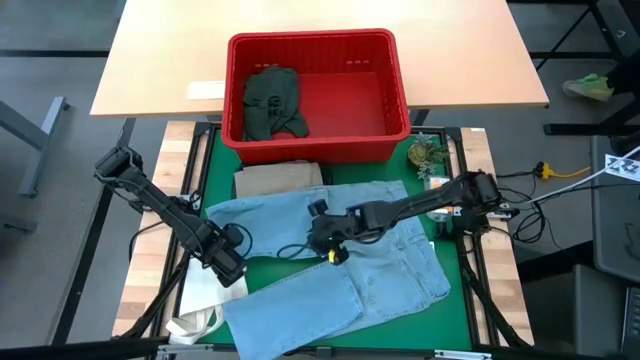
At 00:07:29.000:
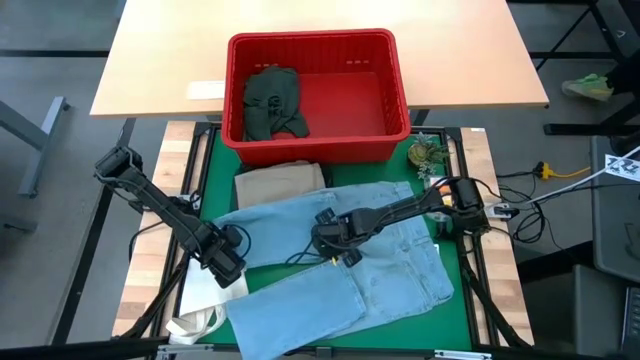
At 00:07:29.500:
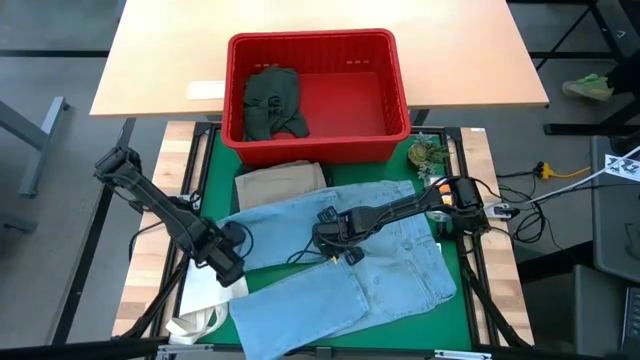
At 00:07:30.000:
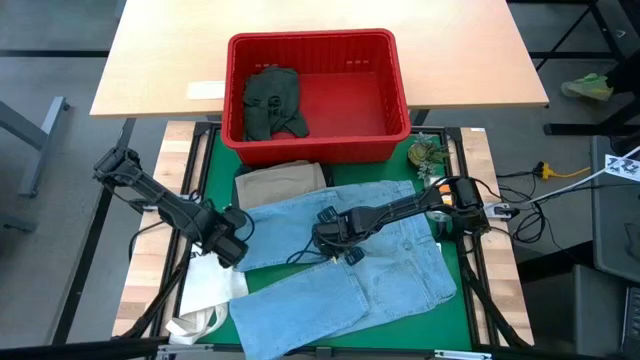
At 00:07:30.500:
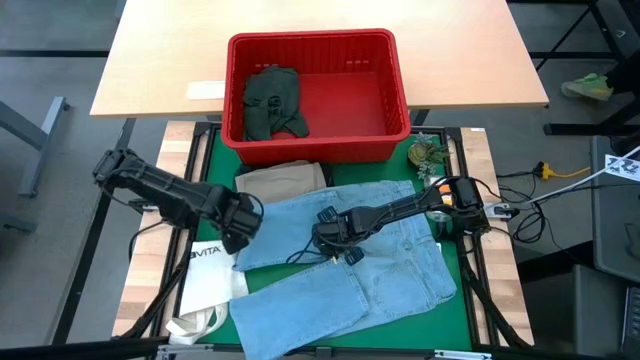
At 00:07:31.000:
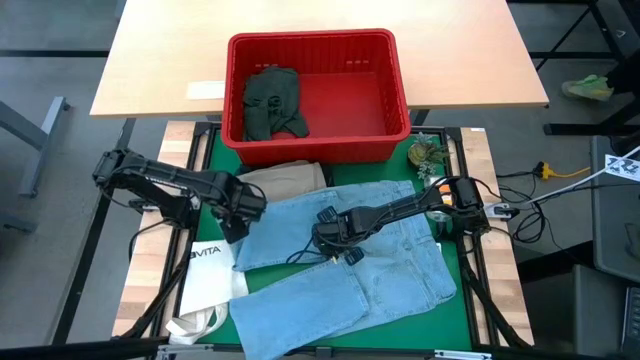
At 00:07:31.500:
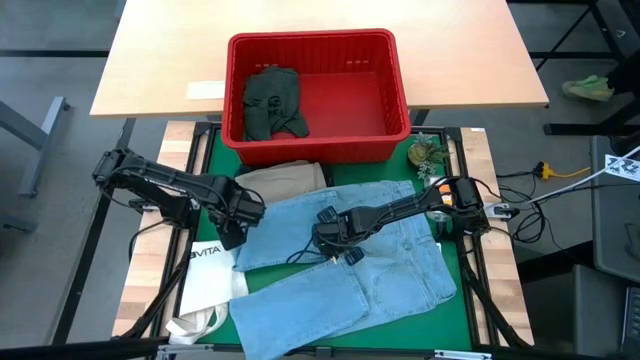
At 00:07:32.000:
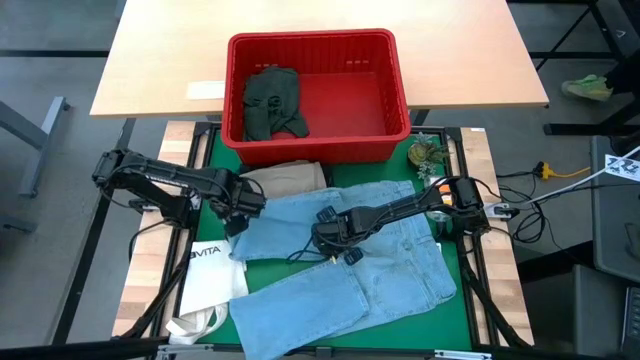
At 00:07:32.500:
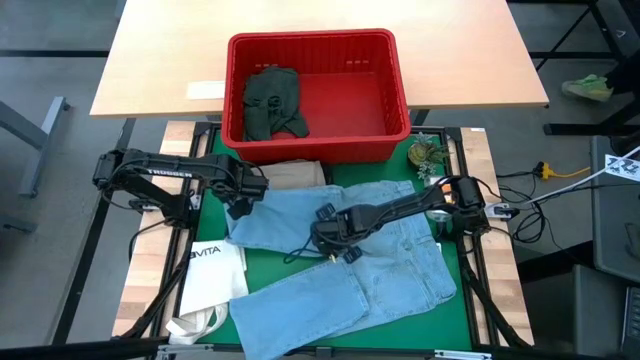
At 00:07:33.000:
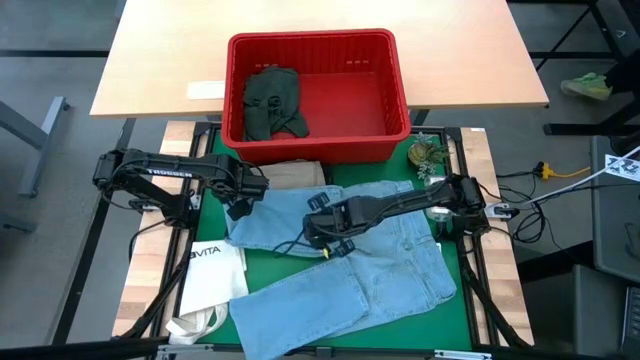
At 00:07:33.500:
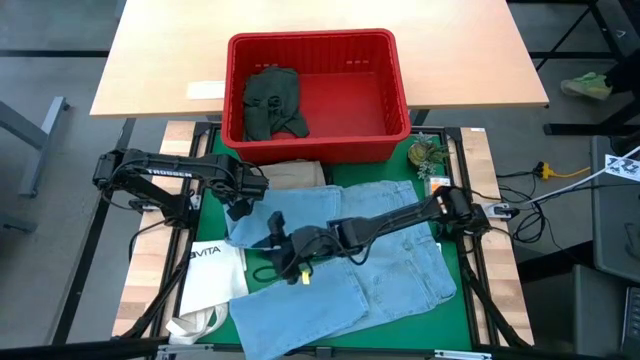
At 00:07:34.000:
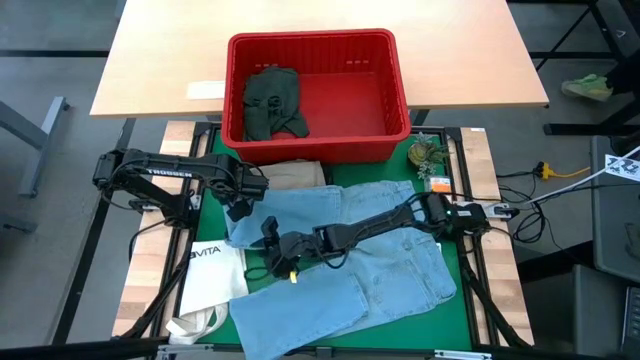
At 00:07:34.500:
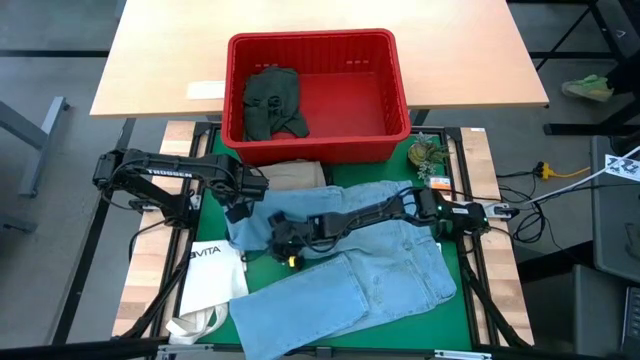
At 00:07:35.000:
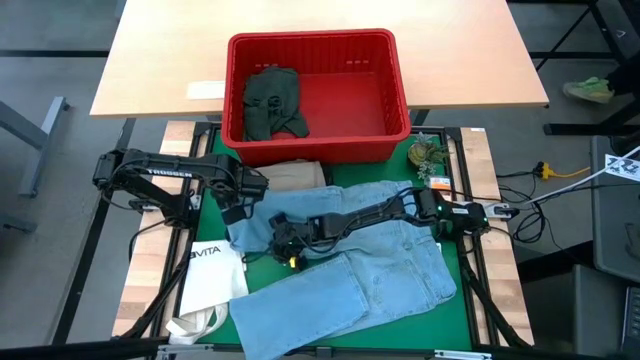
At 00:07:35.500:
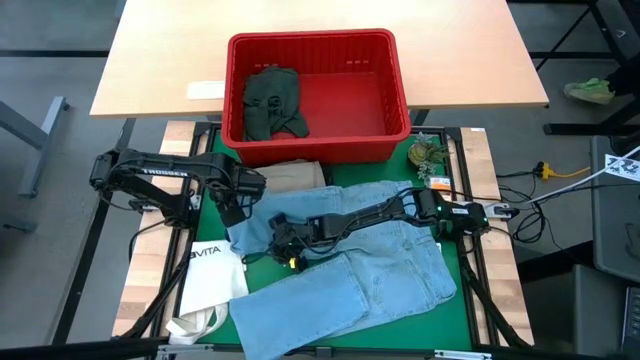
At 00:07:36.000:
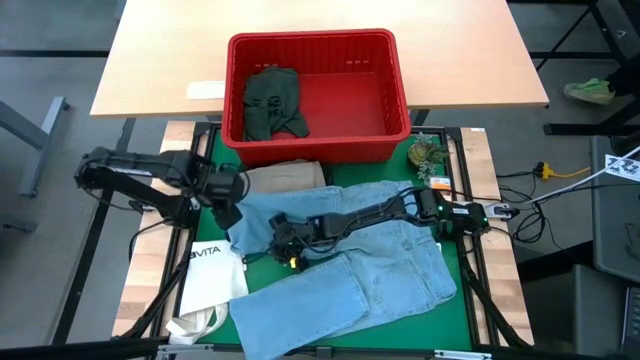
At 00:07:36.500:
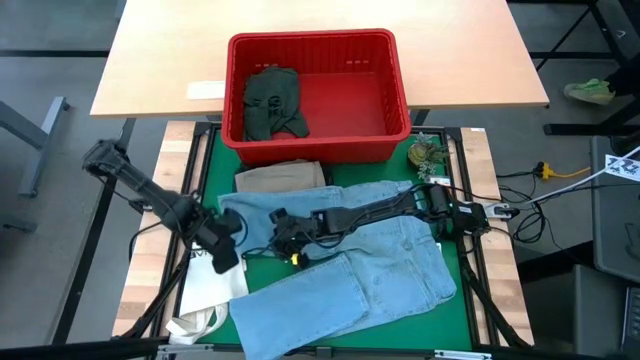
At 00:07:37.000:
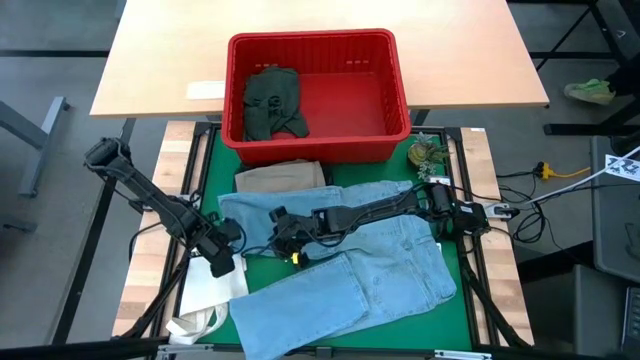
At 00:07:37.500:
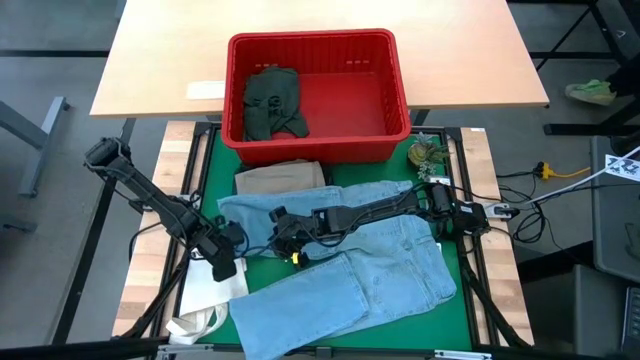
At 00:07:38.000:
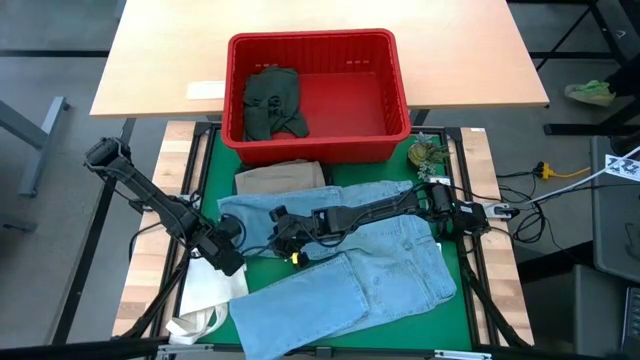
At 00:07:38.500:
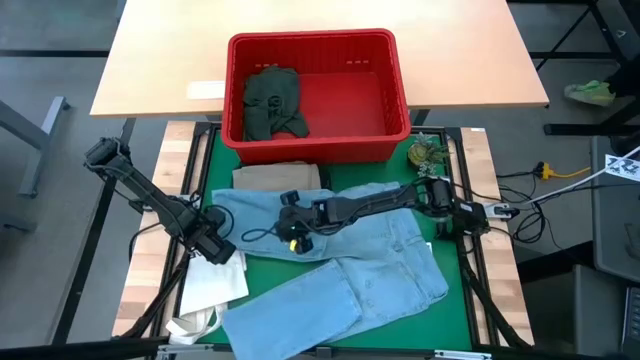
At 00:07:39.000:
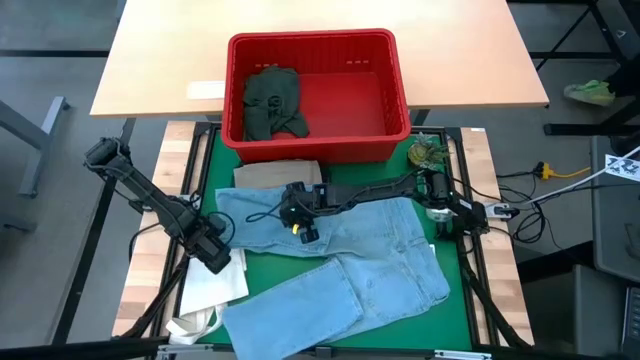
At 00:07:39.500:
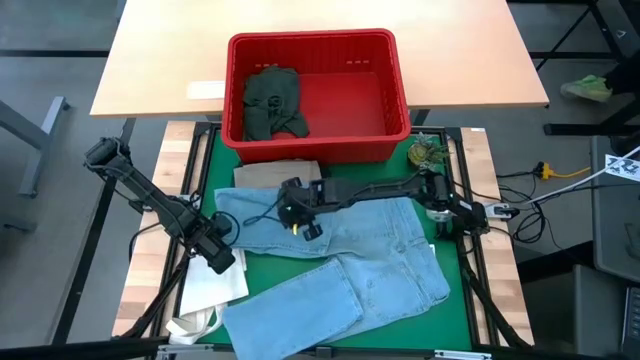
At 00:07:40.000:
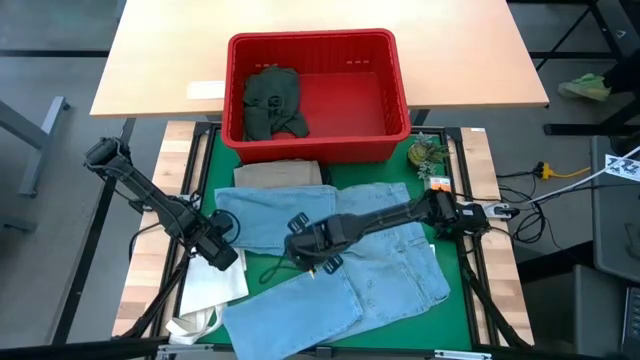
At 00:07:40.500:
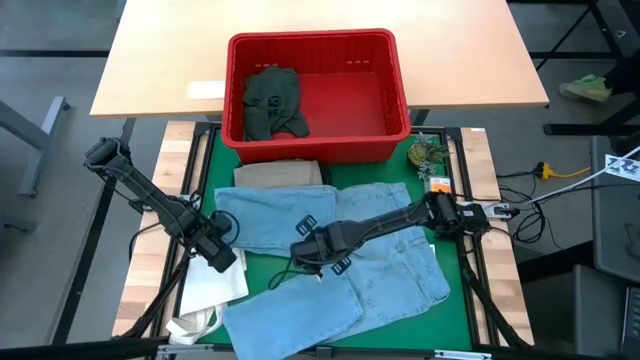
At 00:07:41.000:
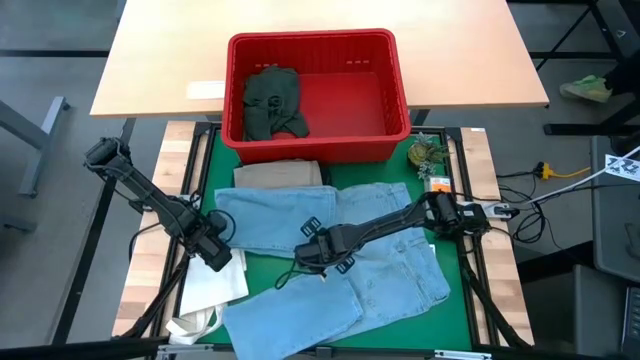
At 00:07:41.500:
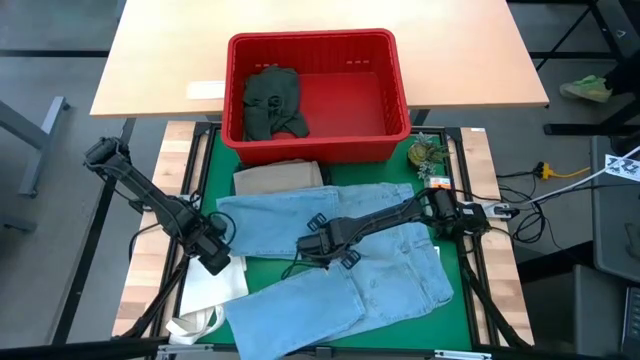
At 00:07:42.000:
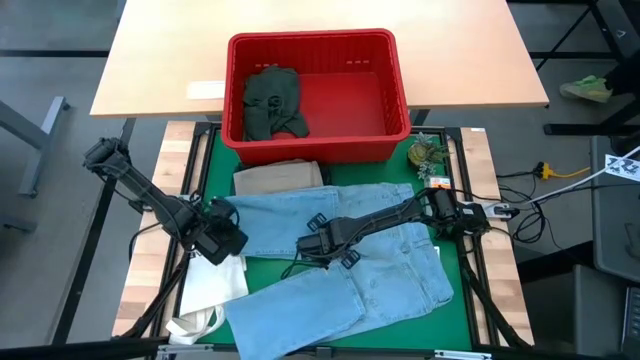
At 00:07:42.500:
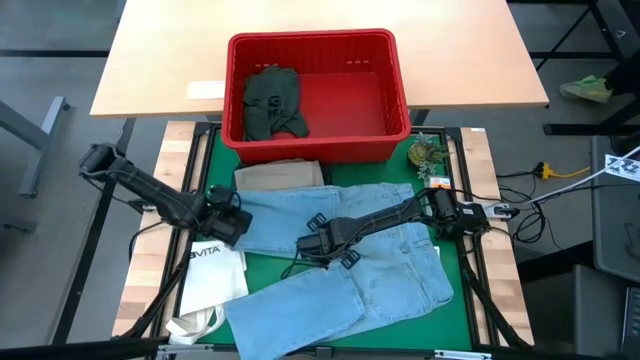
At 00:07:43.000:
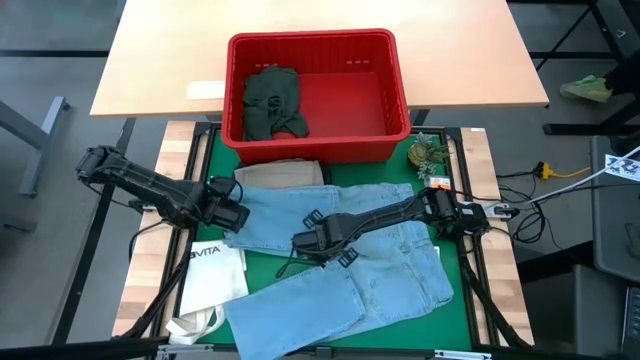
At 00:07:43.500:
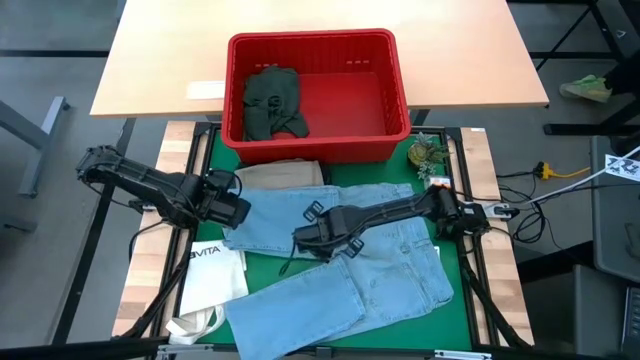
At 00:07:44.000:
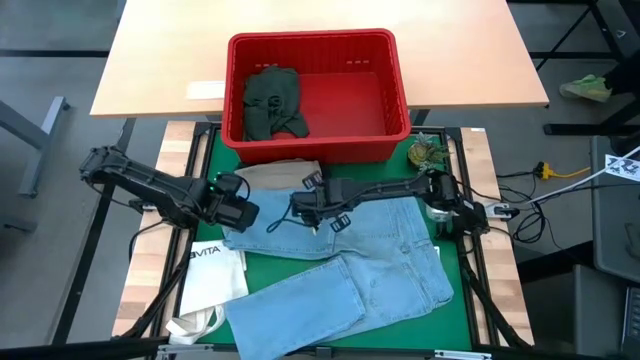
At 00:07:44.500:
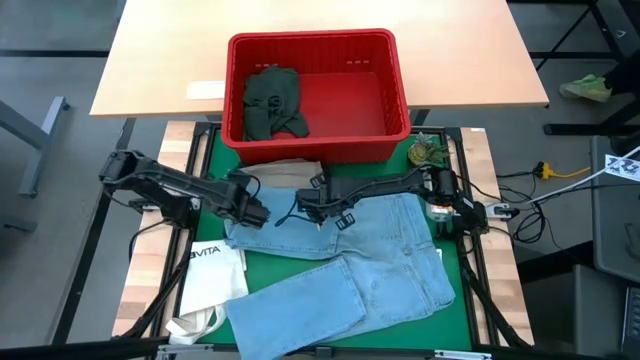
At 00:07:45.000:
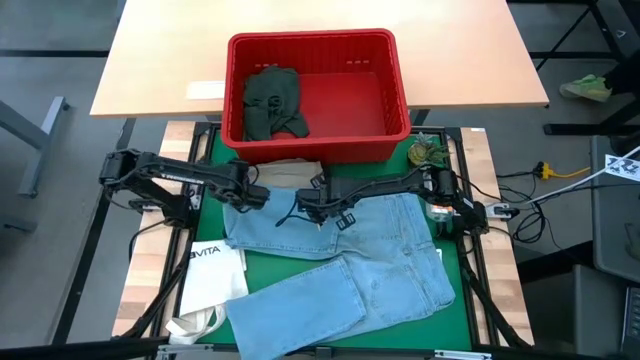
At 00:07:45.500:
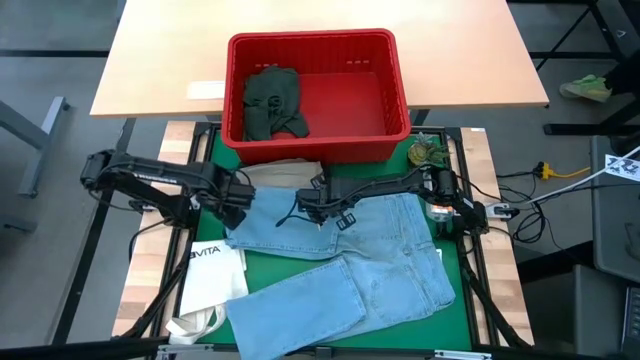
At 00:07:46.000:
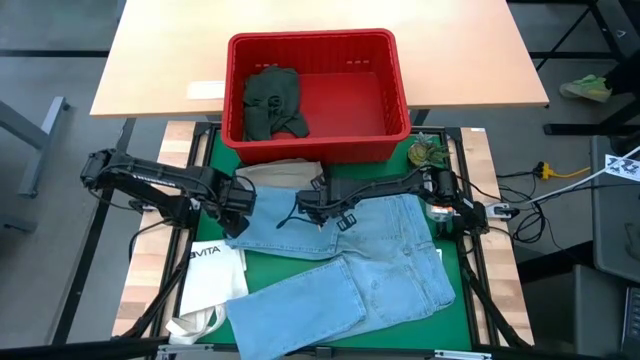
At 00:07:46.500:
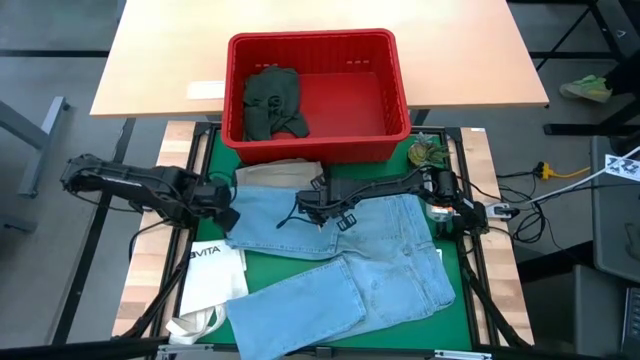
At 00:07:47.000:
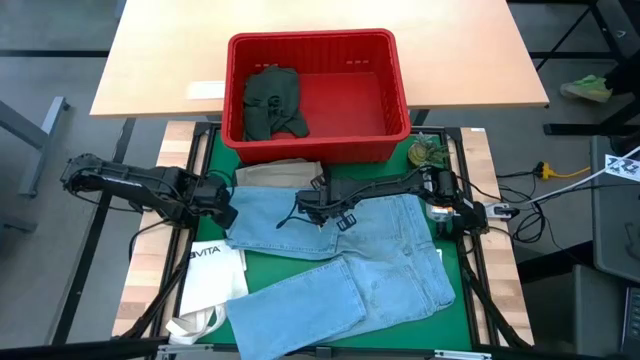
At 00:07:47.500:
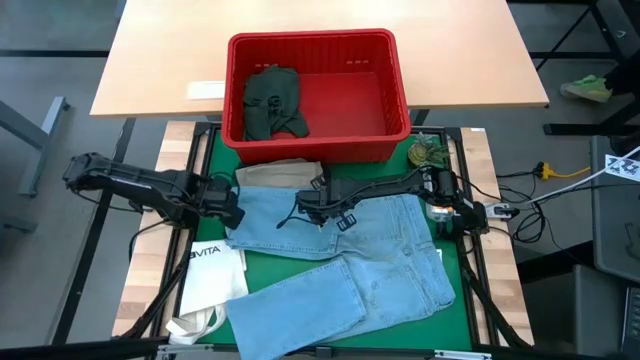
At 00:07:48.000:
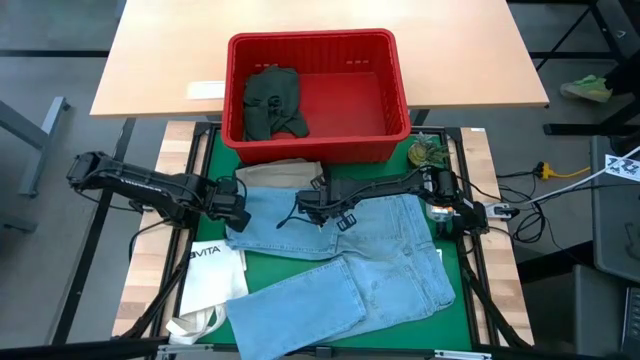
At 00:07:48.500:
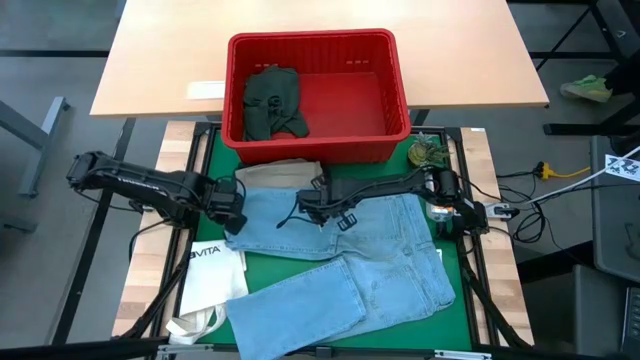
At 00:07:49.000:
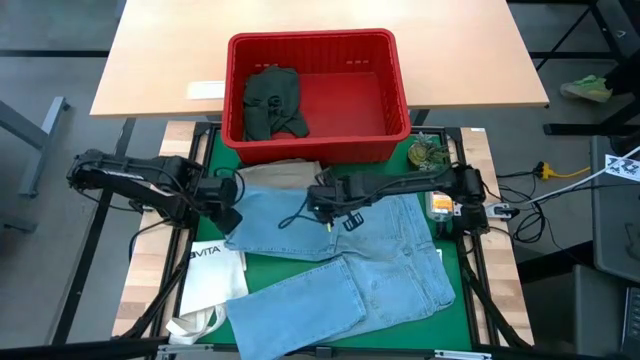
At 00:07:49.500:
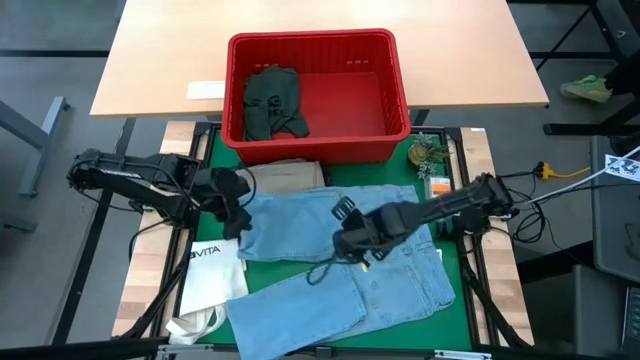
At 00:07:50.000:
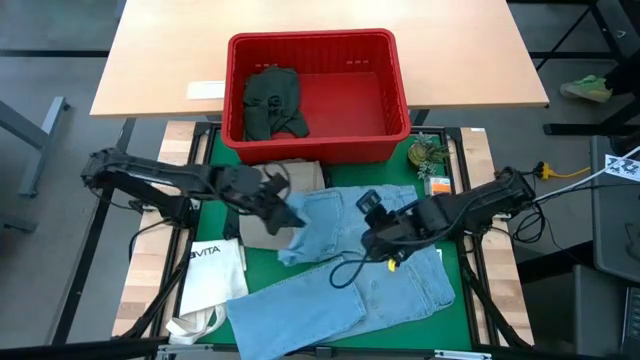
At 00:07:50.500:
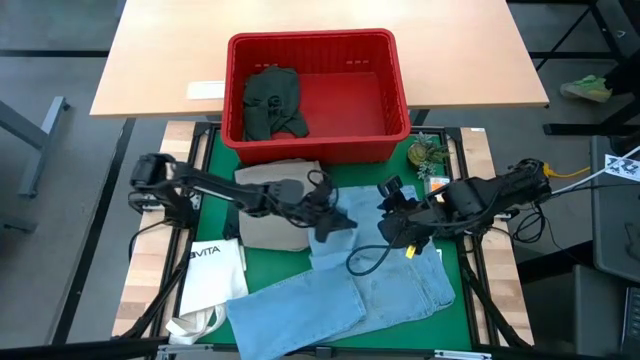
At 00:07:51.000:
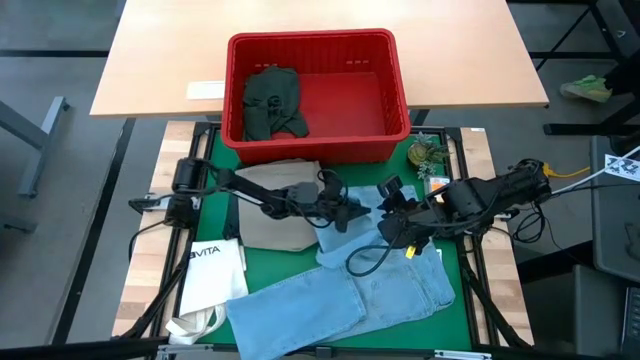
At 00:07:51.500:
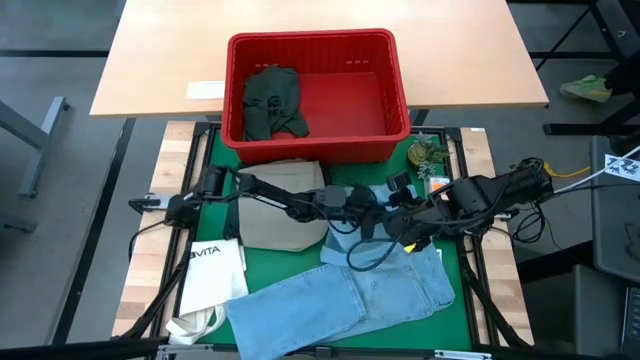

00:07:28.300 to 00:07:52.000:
Task: Fold Laundry from Bin
Fold the light blue pants
